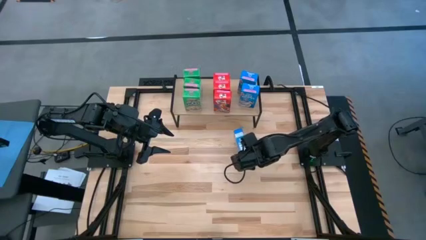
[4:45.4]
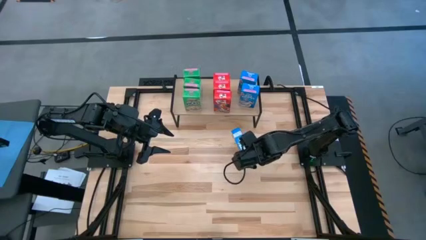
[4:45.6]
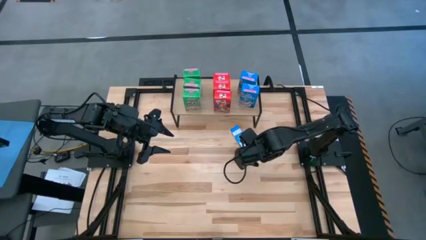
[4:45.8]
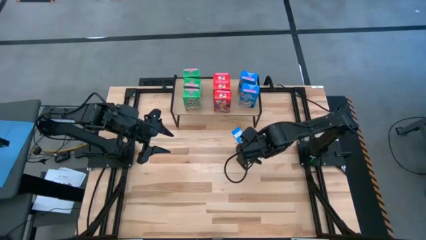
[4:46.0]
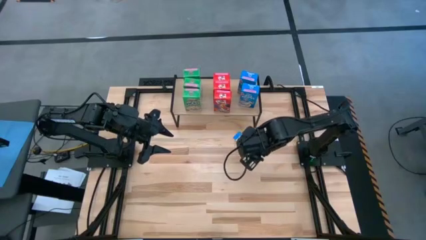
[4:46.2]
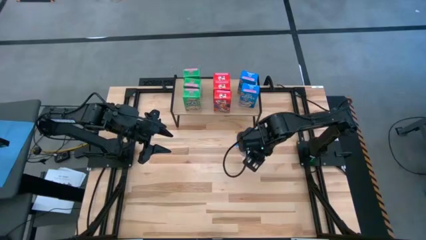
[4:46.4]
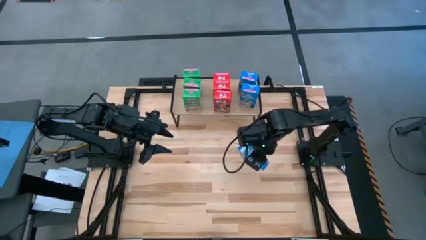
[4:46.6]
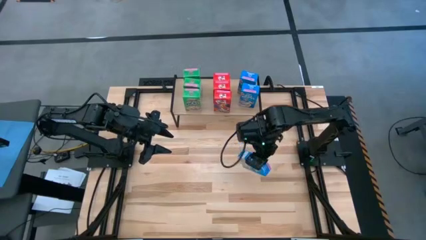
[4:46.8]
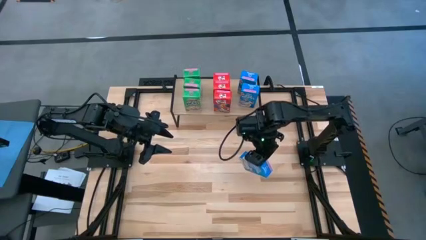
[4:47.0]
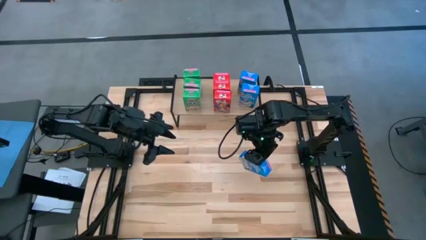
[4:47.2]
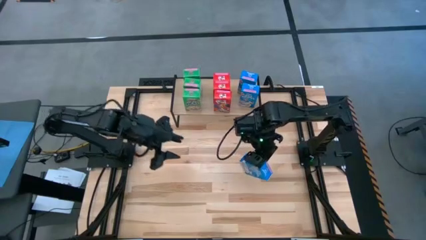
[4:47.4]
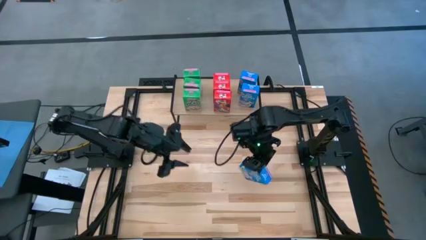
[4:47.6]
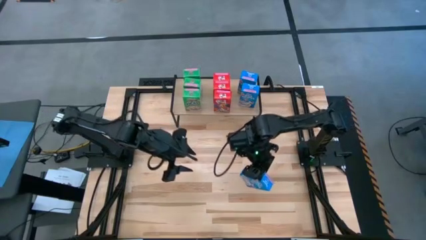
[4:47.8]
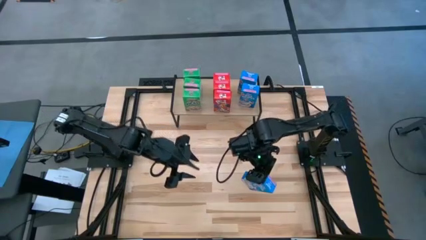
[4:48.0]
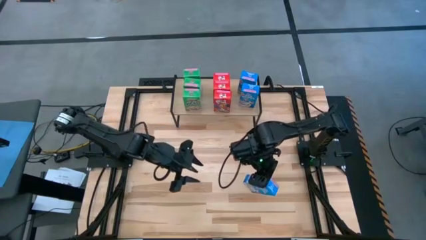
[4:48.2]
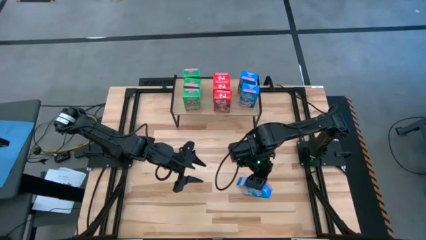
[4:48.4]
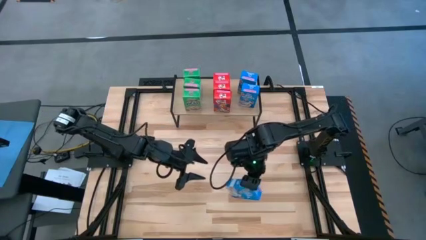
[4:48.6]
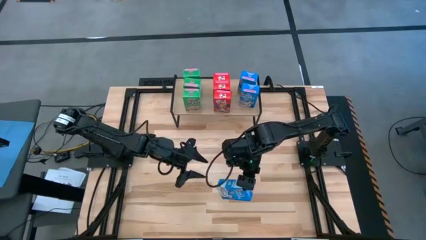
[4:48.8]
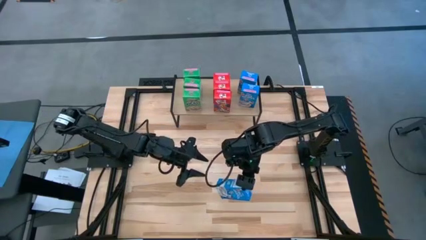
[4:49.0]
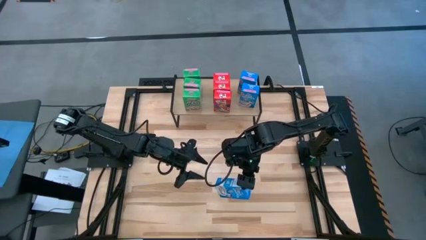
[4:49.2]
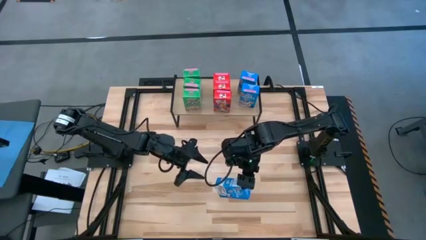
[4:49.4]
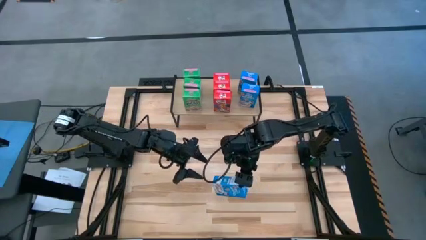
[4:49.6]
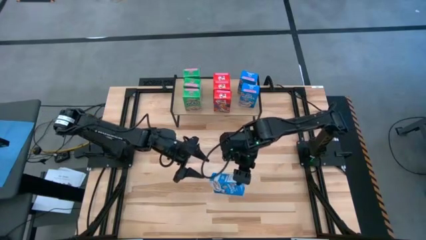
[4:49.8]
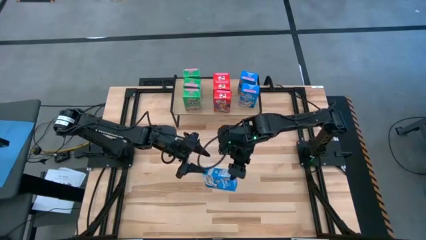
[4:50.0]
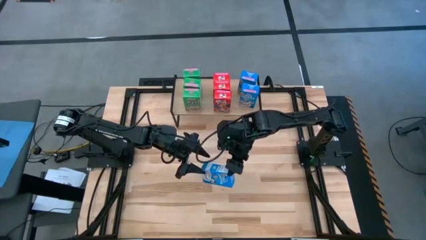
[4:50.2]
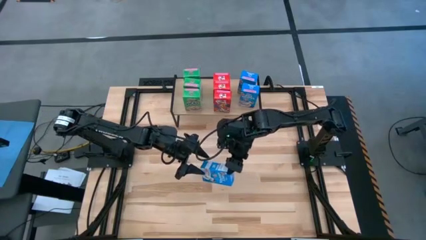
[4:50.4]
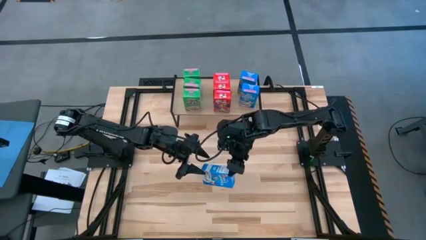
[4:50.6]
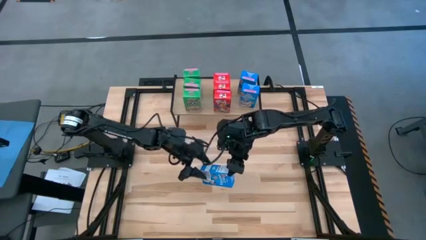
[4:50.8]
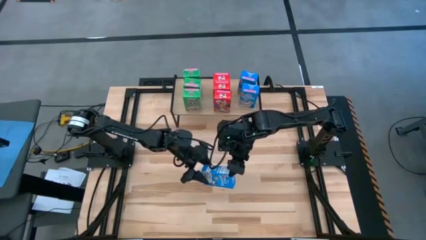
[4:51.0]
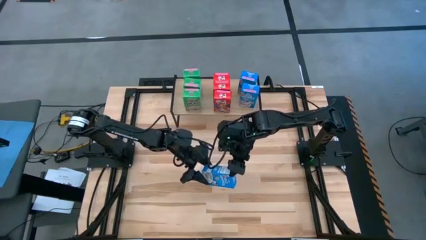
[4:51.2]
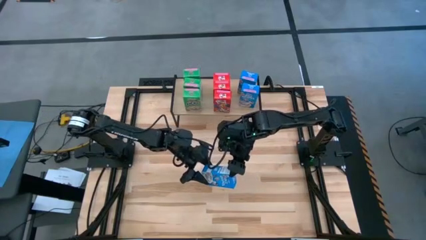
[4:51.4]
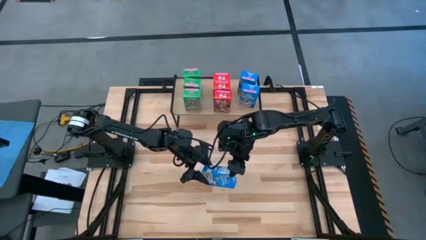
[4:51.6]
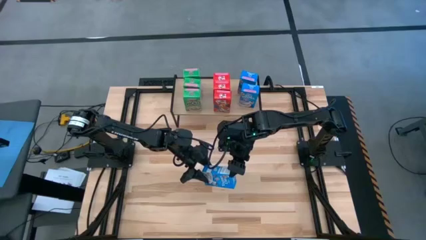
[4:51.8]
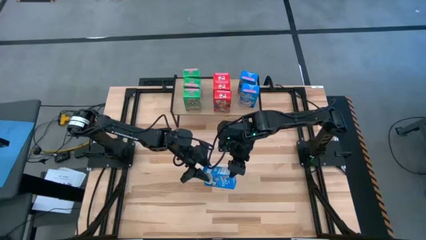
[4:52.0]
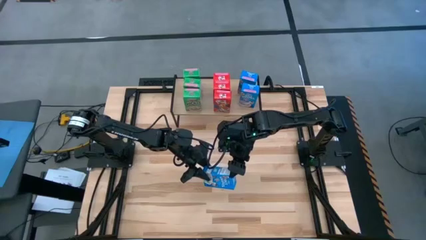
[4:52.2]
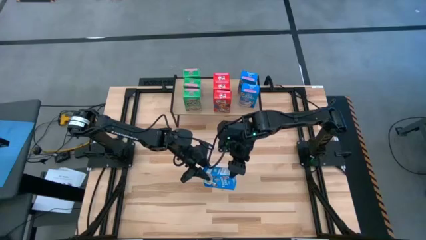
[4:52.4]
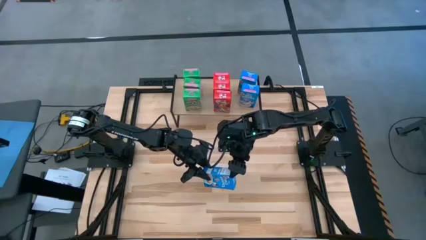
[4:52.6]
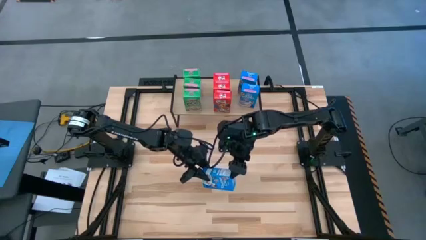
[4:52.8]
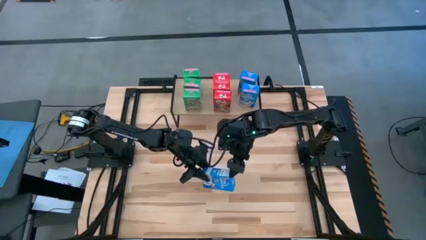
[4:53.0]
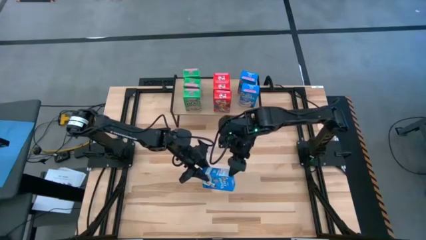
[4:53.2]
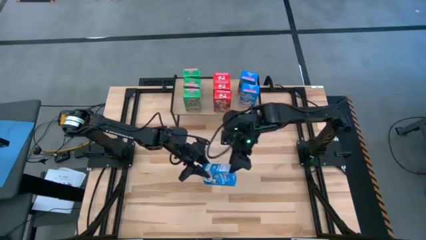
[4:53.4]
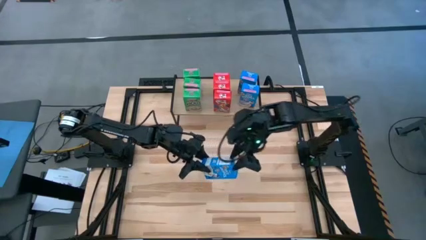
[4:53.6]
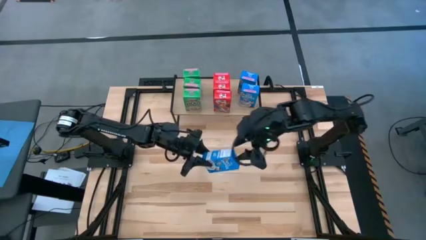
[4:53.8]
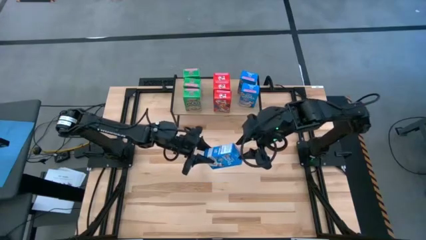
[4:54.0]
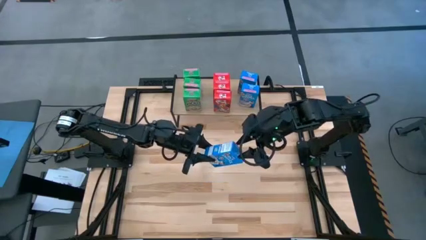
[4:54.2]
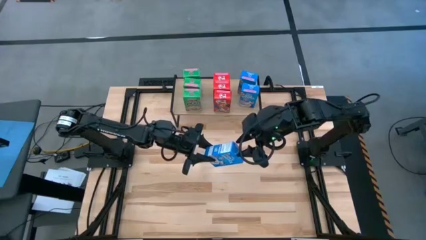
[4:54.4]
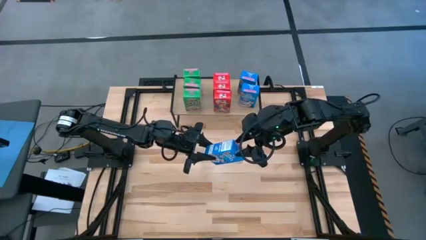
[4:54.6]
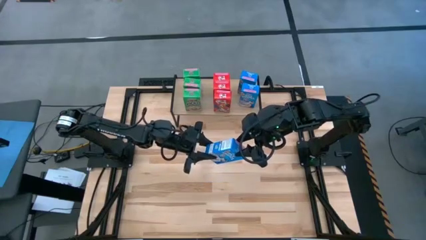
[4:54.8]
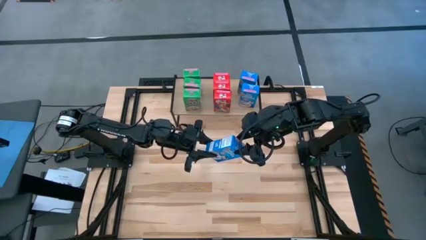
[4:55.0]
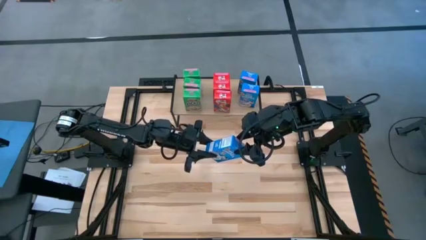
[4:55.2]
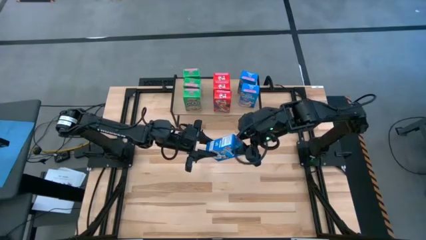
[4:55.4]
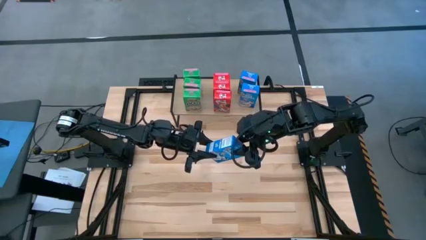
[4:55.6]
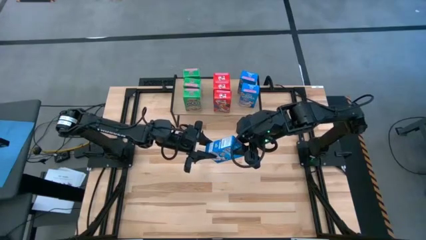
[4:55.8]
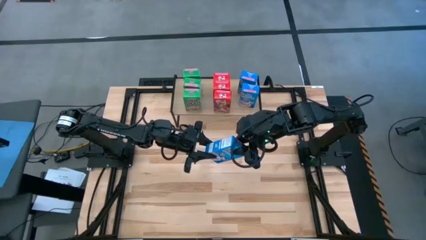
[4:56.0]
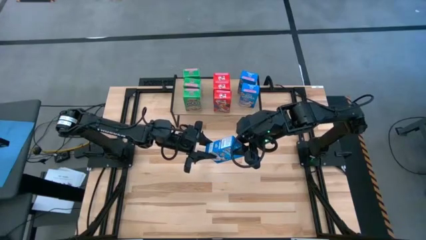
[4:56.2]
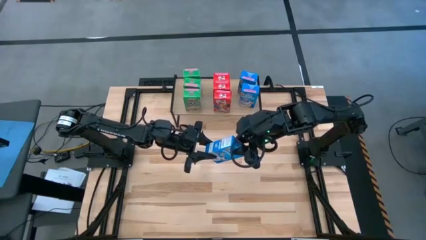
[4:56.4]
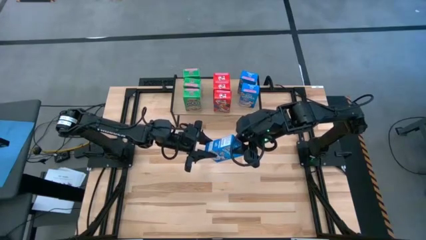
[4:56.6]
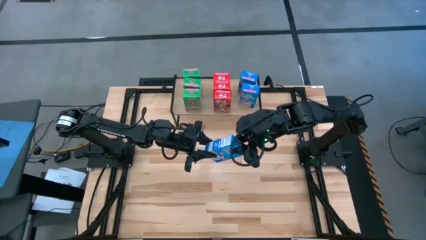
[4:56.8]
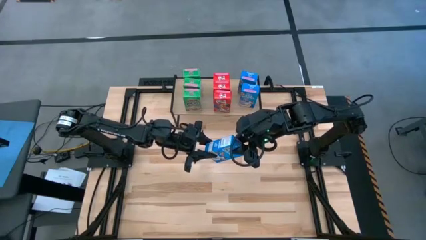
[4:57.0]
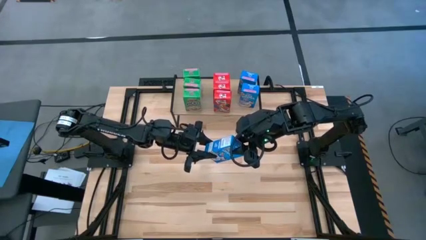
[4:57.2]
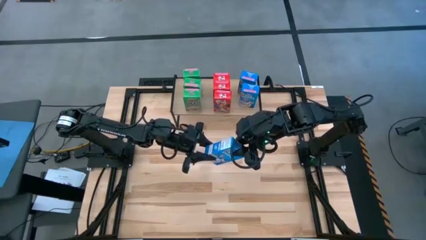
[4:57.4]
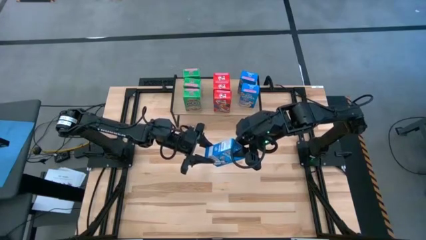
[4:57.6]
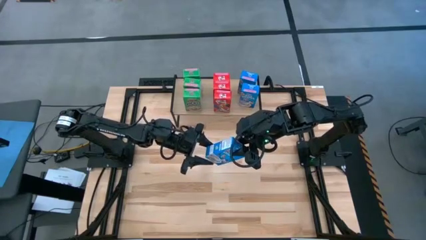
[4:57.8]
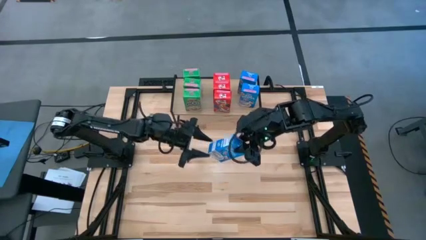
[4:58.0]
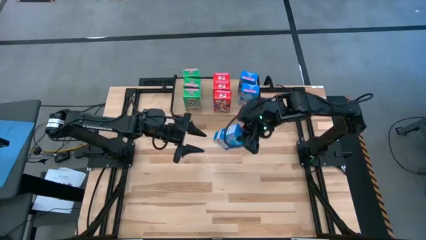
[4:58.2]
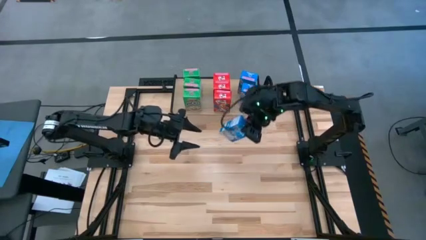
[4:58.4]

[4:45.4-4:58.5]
Task: Stack cereal on shelf
Put the blue cereal box on the shelf aligned with the other blue cereal boxes

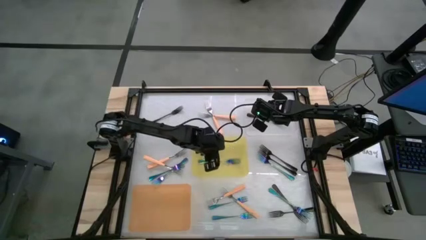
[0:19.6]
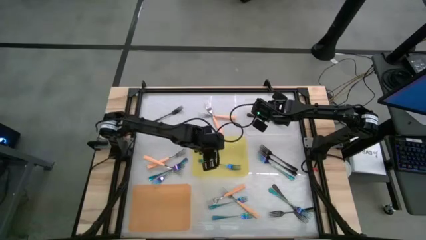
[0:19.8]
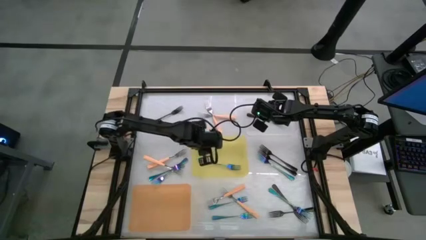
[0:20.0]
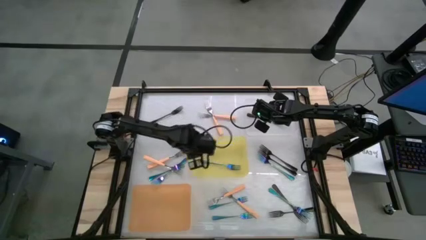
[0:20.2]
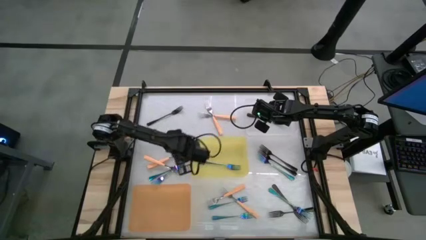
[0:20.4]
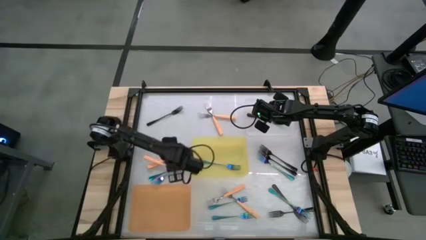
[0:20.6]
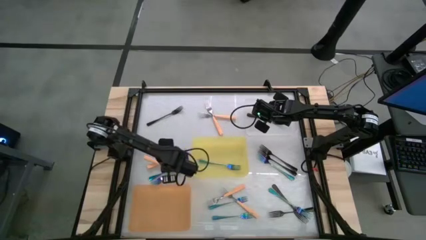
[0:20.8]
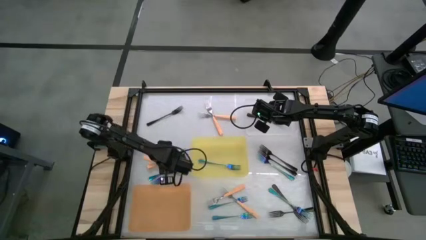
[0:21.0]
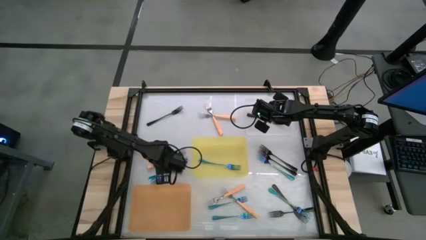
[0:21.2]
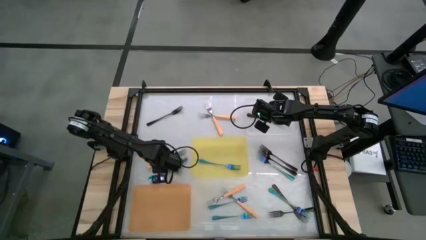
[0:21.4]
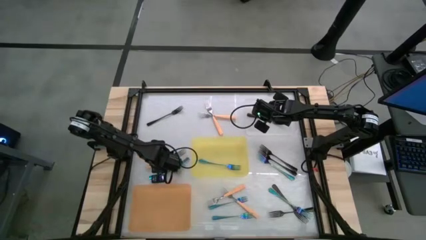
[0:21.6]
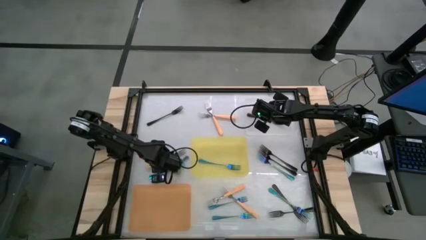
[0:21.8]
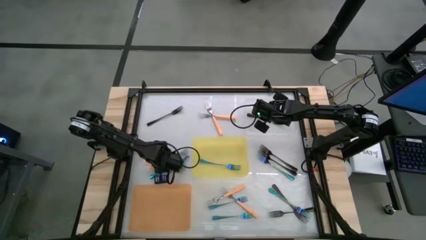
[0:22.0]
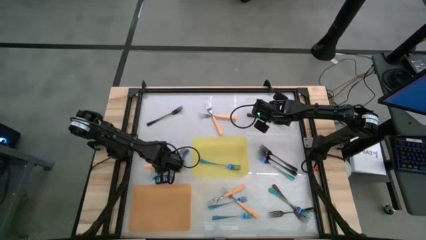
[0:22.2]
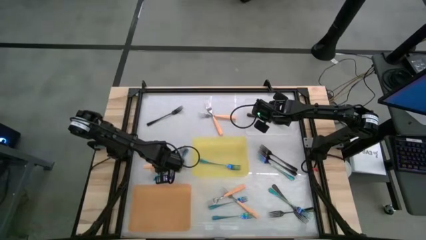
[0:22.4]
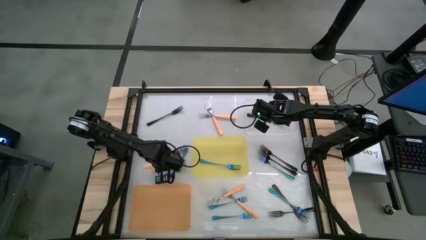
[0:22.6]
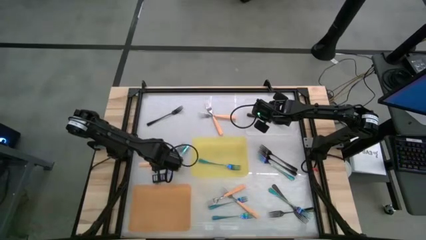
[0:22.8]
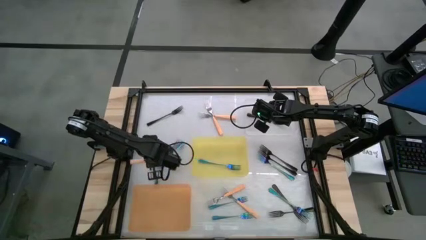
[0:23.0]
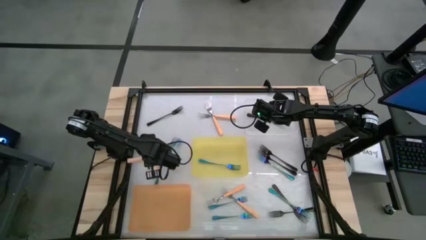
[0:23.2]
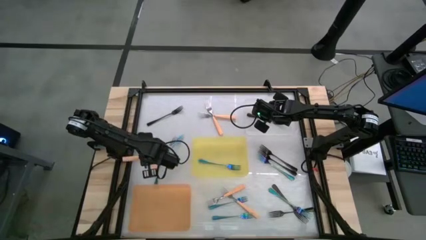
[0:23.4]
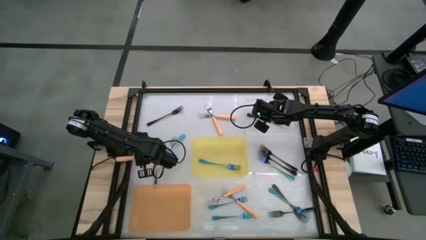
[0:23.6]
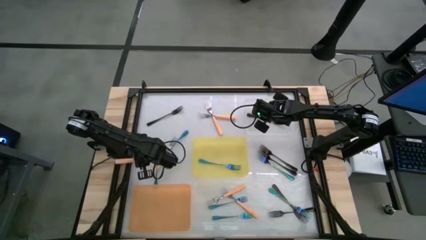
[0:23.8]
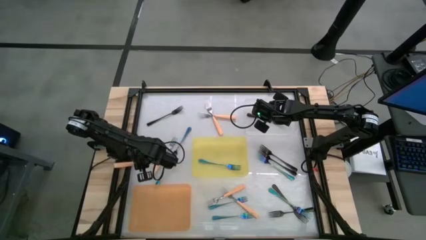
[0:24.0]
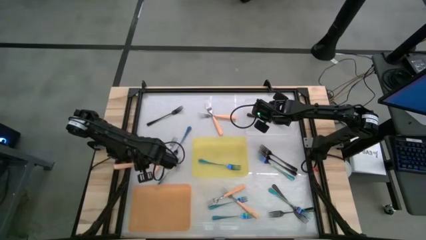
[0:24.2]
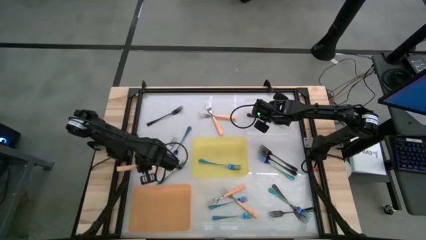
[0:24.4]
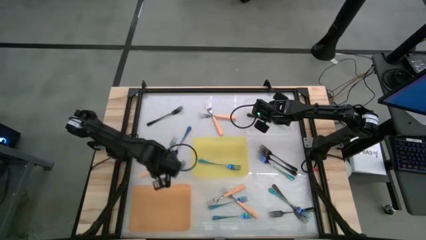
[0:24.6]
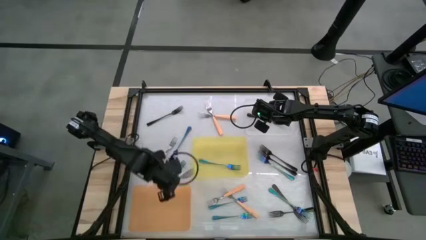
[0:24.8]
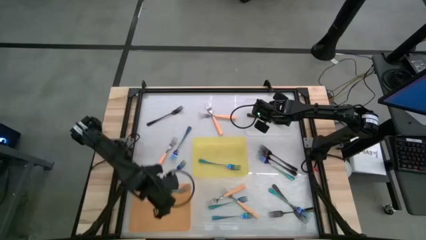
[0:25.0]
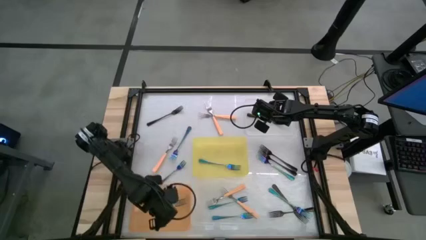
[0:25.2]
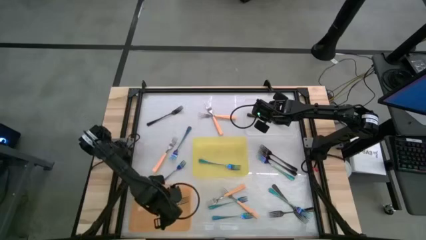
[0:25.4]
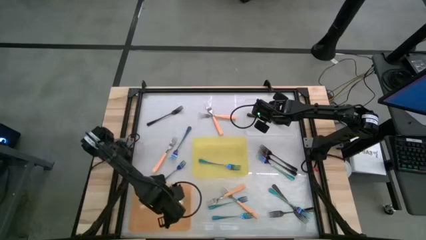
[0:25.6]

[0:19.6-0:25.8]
Task: Sort silverware by color (type)
Put the orange fork into the orange bin
